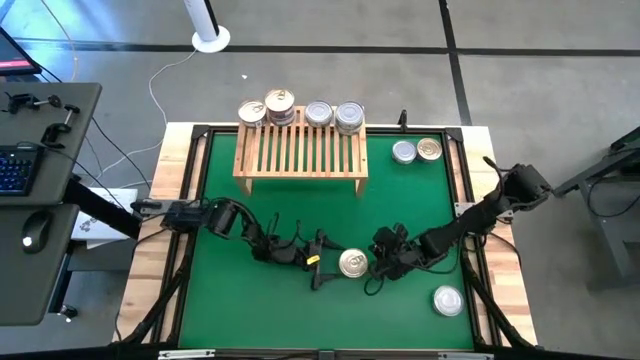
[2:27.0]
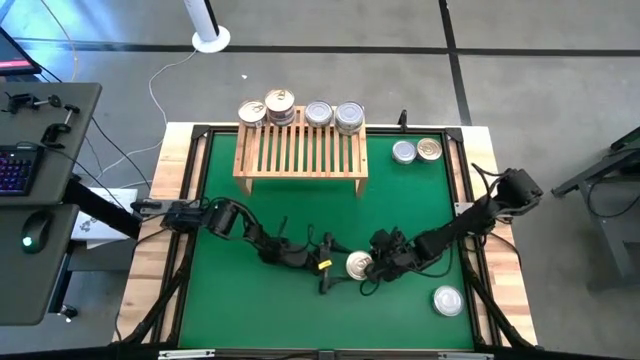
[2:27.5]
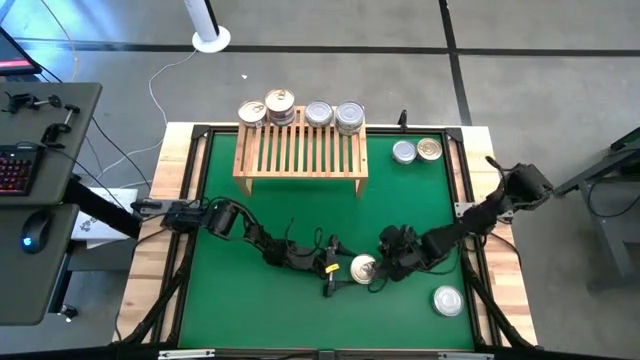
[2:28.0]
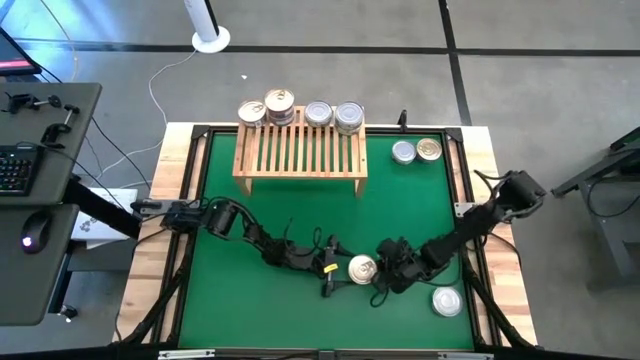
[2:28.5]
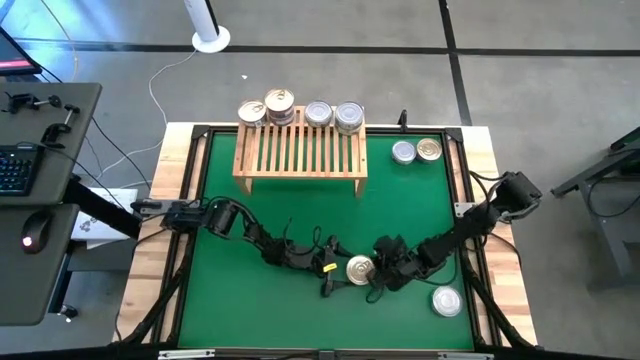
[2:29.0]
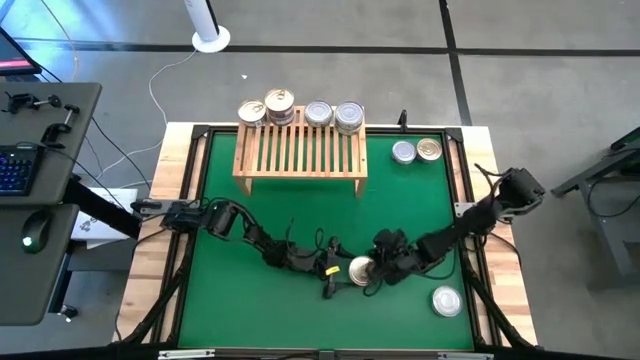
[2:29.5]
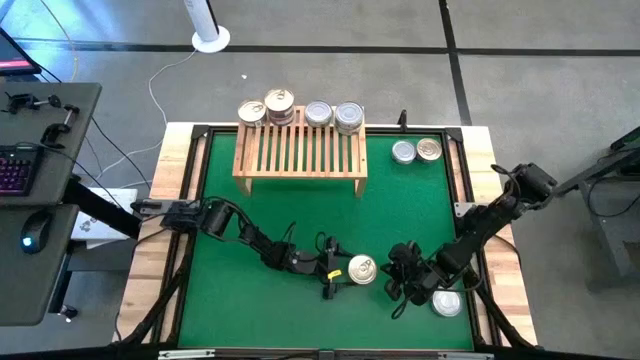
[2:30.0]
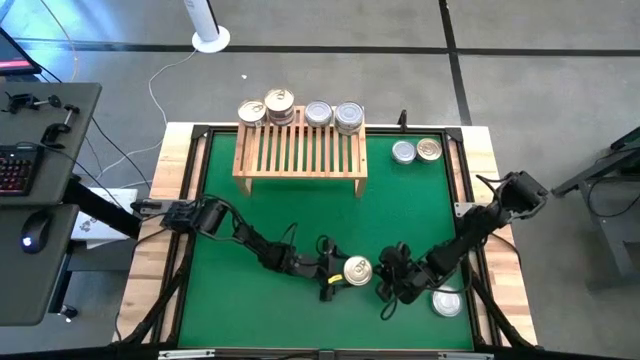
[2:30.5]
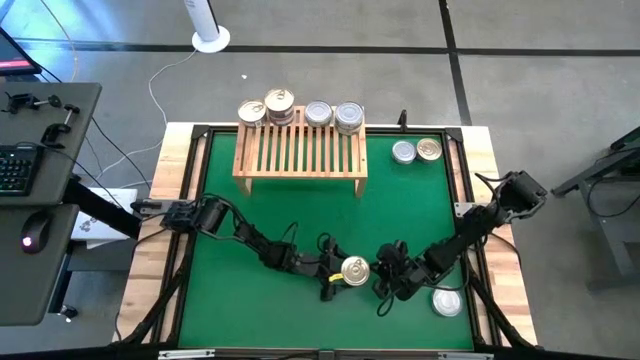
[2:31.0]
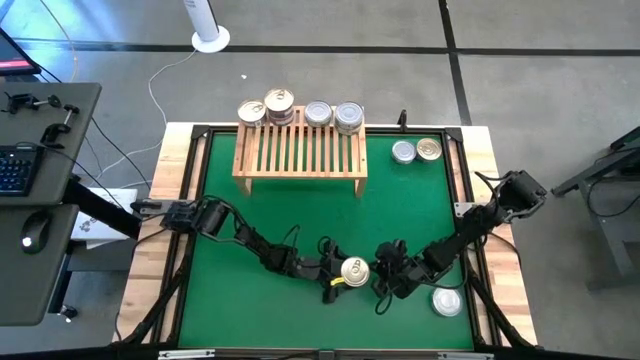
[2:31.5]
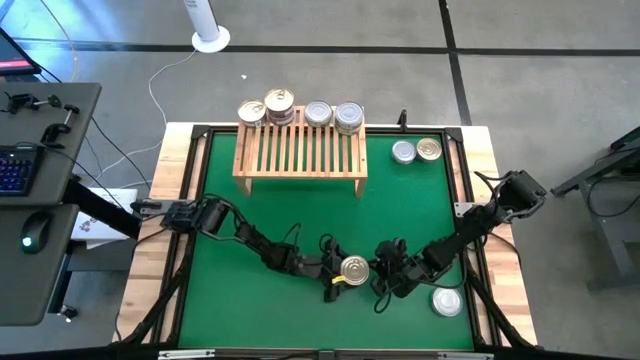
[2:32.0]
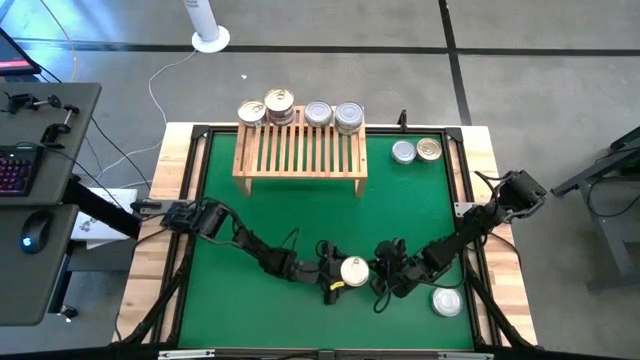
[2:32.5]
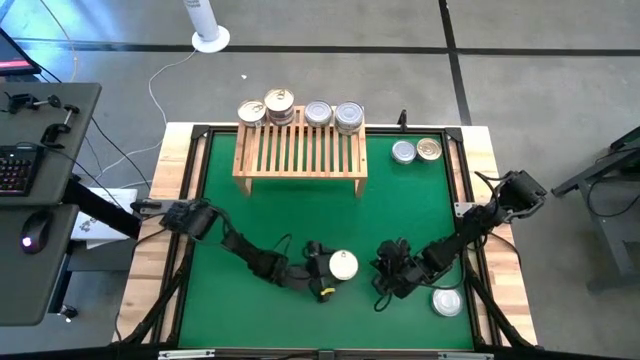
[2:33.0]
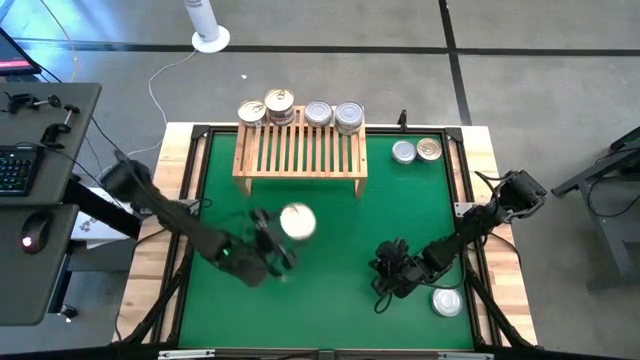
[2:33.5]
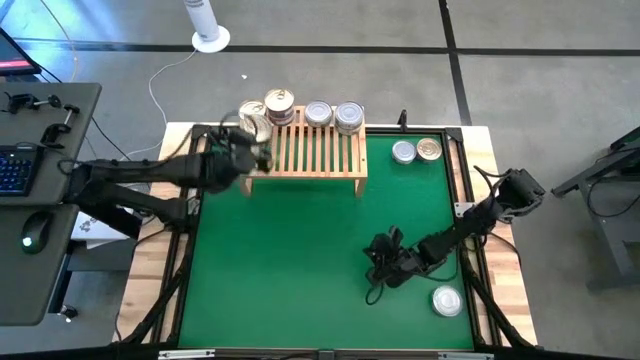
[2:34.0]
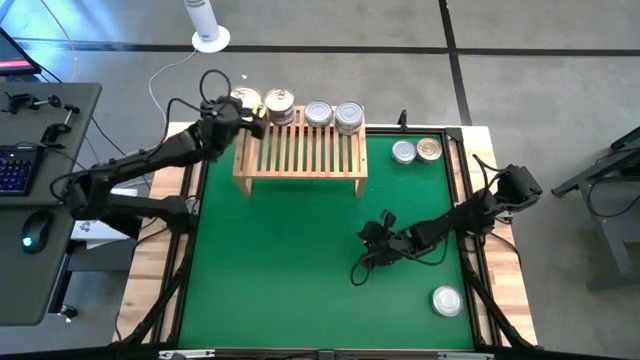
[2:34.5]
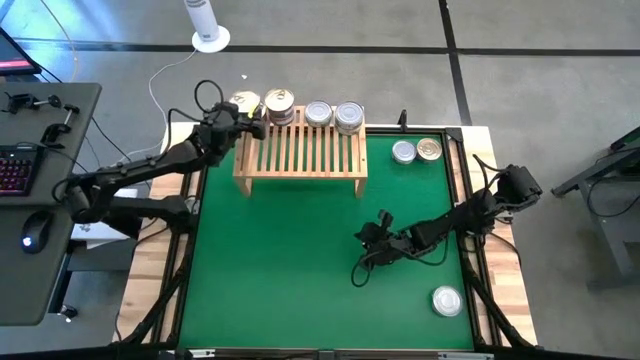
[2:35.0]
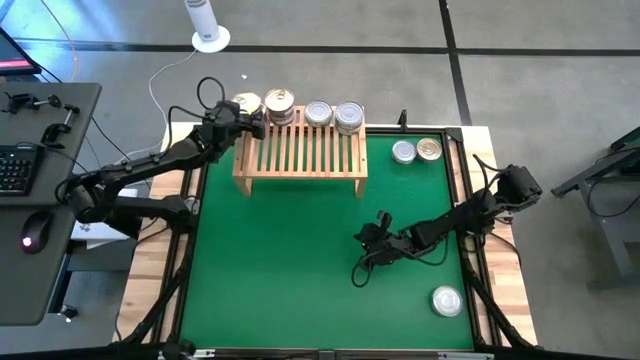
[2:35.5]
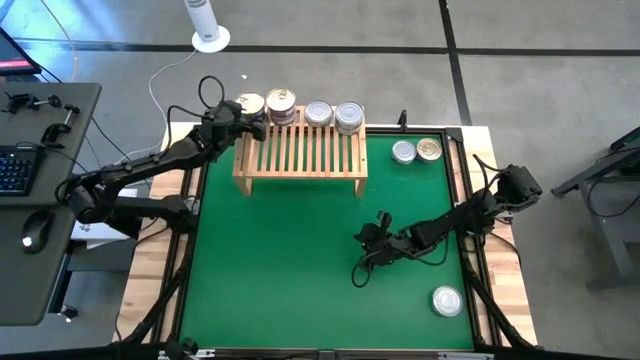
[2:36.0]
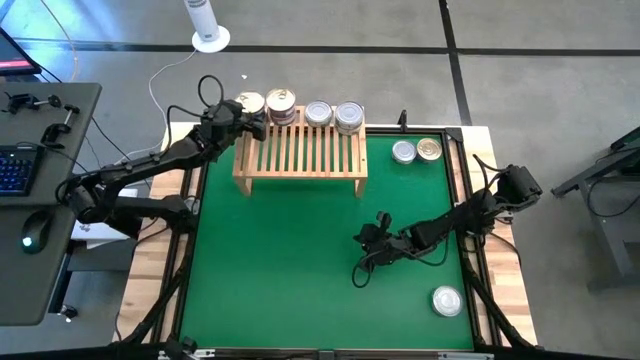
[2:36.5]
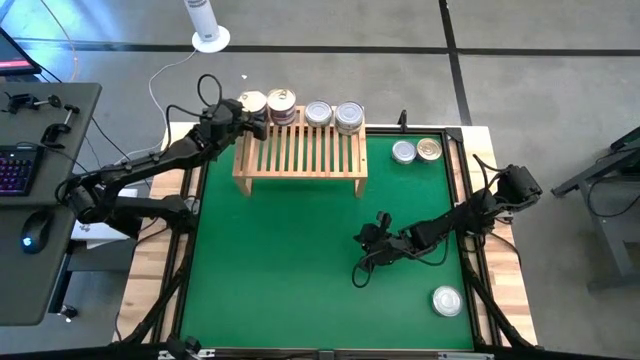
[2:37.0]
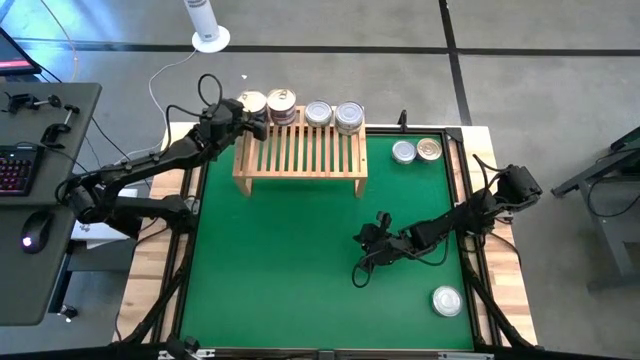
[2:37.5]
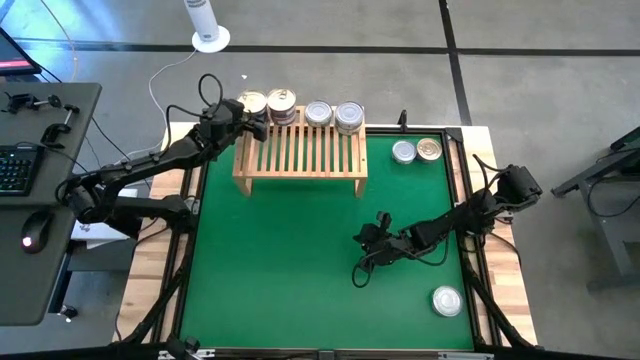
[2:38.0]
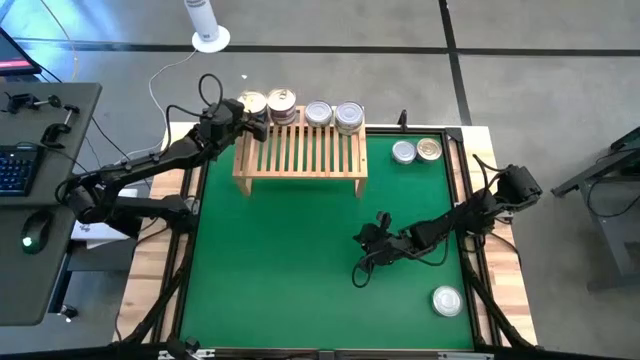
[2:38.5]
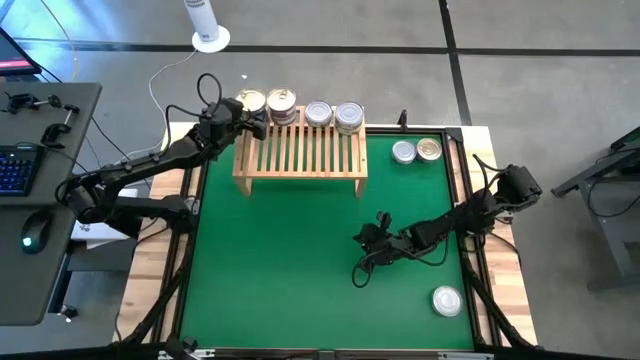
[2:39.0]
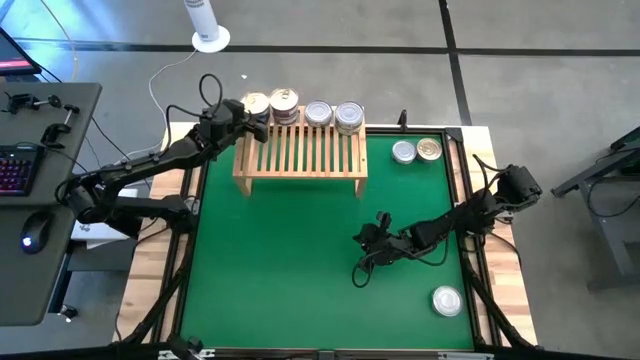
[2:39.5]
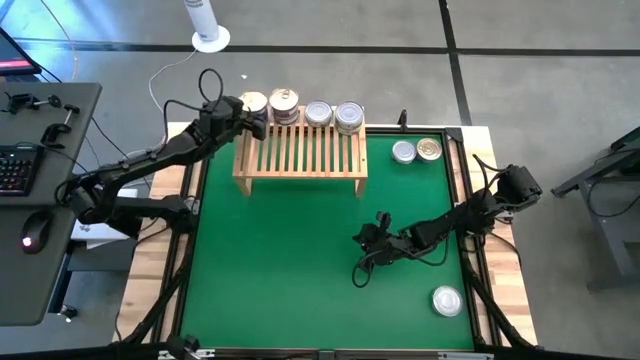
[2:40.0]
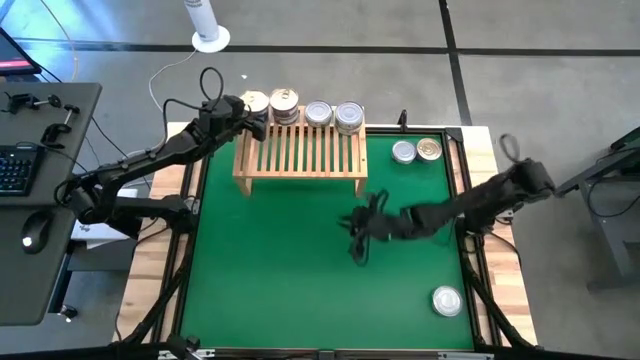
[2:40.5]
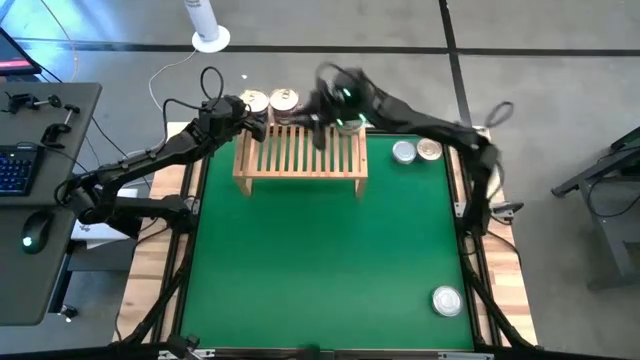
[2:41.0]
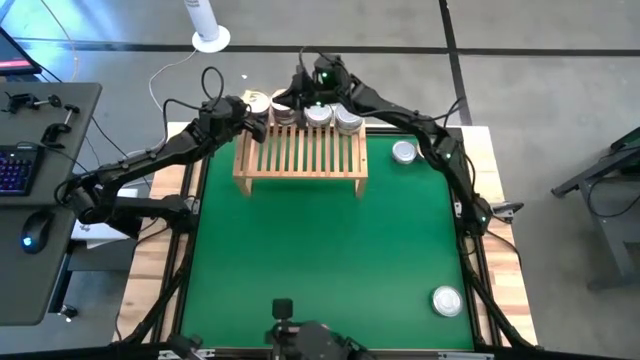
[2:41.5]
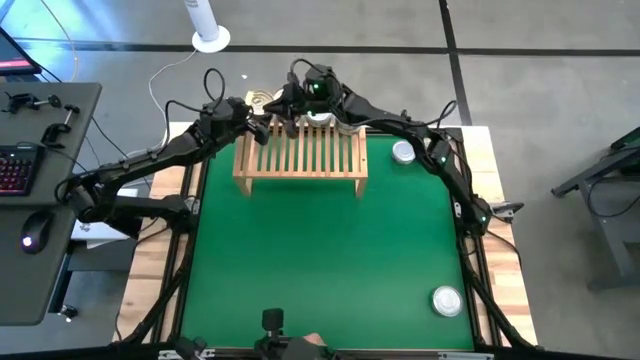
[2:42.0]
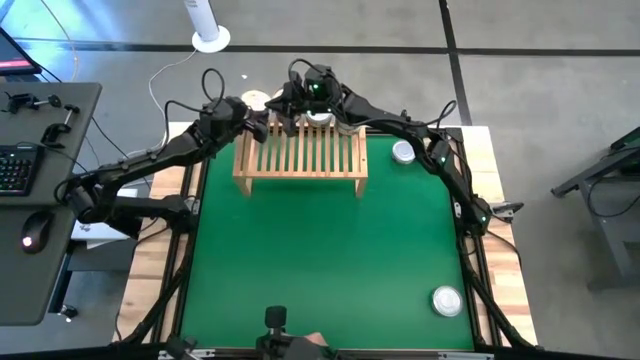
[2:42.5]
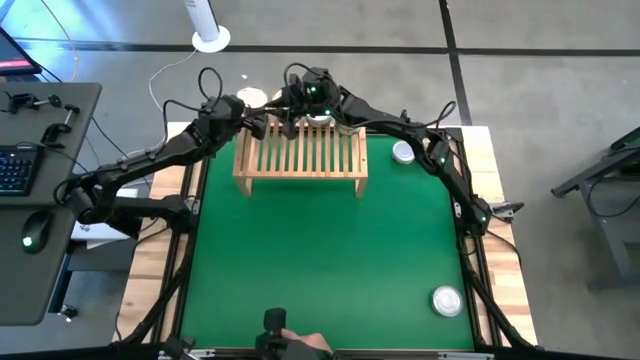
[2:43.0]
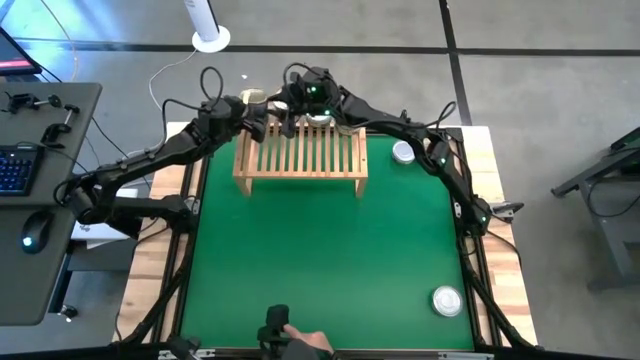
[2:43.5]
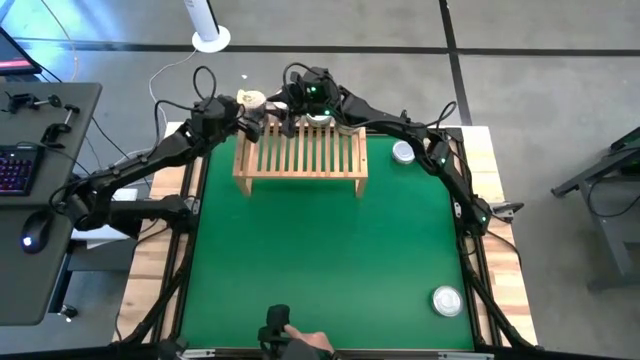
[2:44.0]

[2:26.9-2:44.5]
Task: Stack canned seafood by type on shelf
Stack the blue pink tuna can on top of the left blue pink tuna can on the shelf

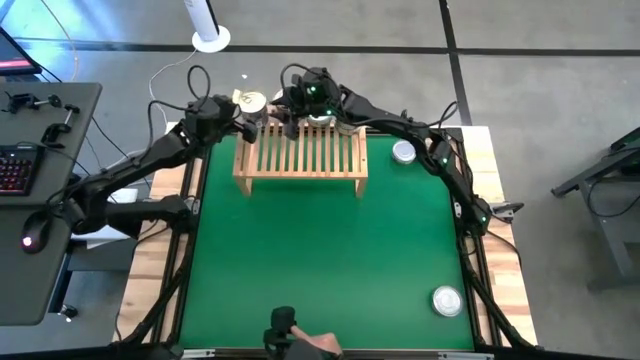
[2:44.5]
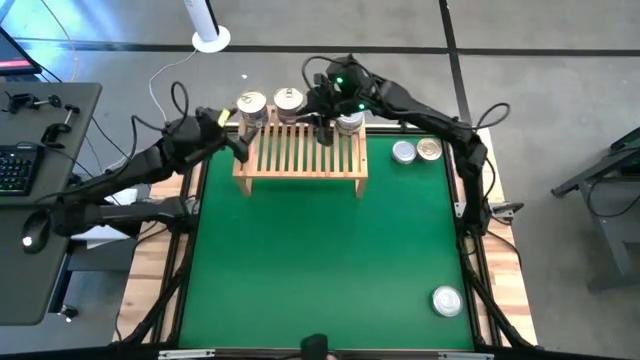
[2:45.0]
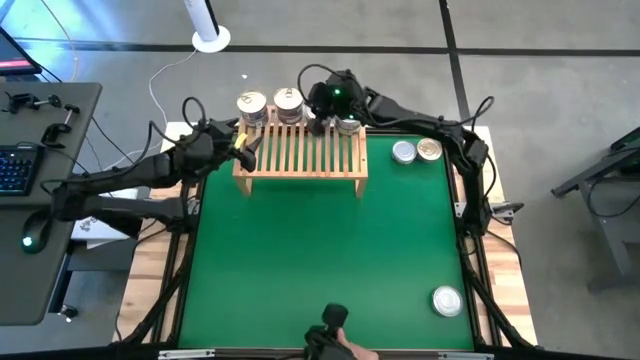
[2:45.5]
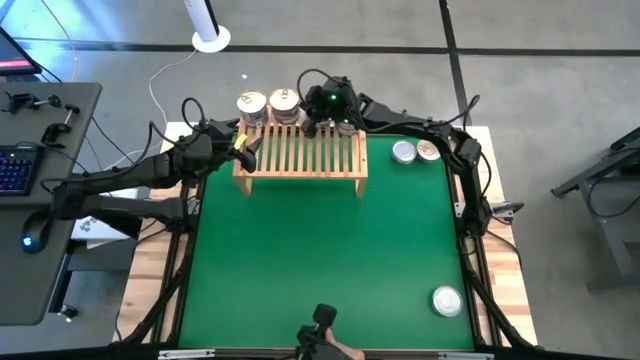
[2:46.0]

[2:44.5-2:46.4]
Adjust the right stacked blue pink tuna on the shelf
